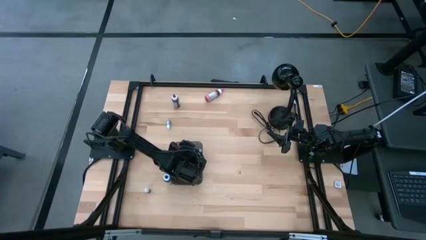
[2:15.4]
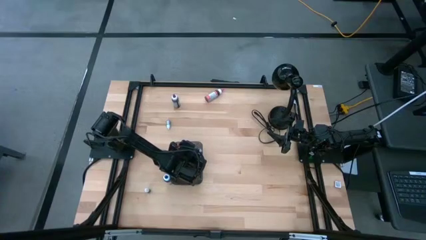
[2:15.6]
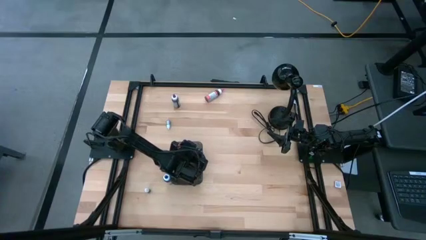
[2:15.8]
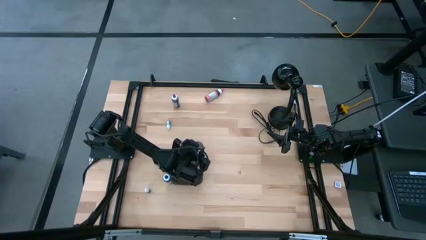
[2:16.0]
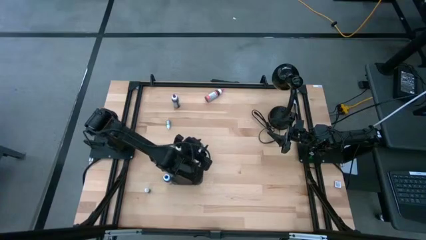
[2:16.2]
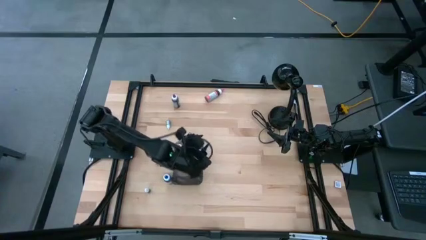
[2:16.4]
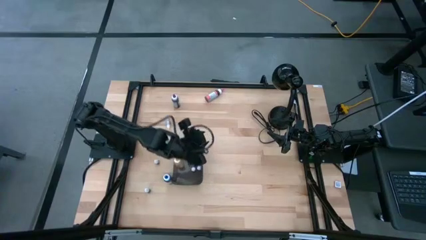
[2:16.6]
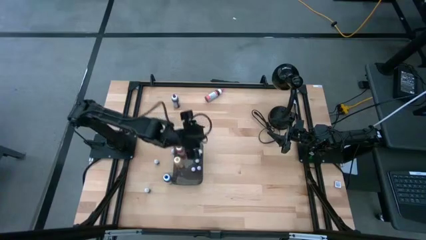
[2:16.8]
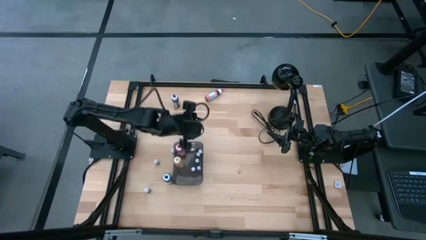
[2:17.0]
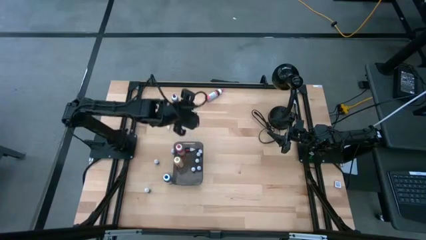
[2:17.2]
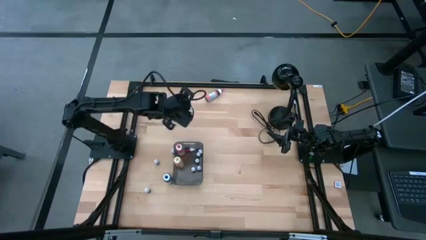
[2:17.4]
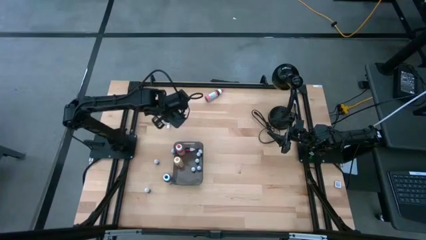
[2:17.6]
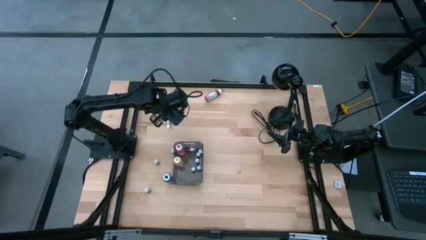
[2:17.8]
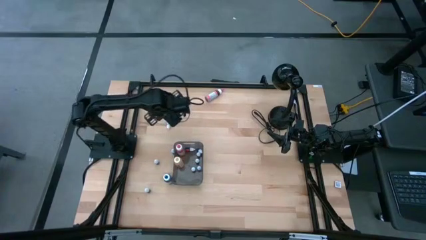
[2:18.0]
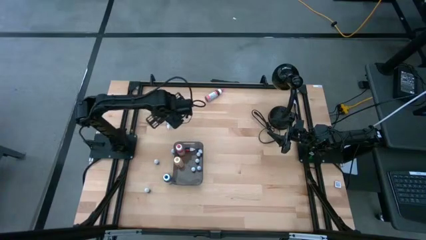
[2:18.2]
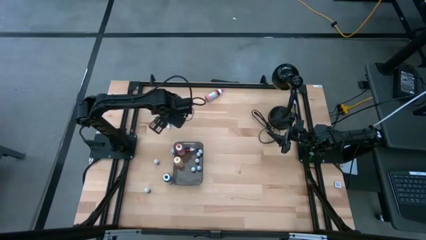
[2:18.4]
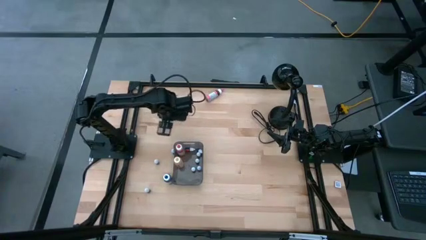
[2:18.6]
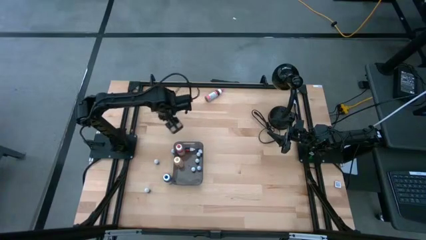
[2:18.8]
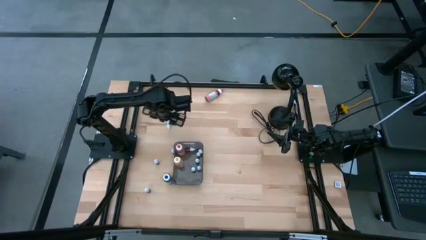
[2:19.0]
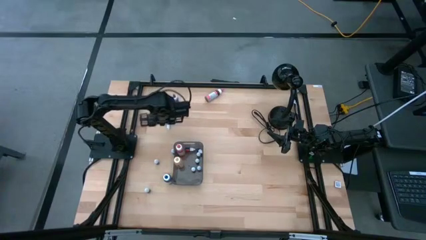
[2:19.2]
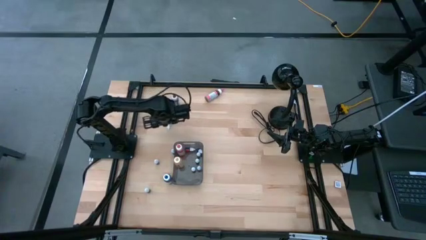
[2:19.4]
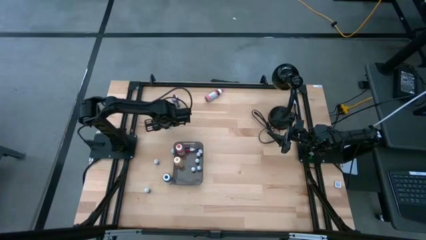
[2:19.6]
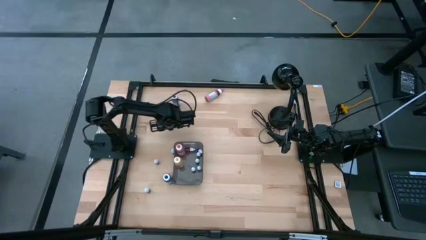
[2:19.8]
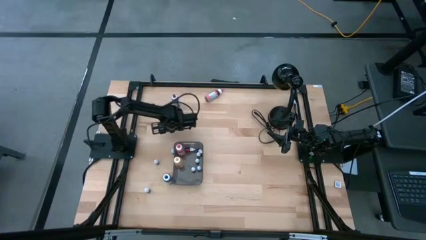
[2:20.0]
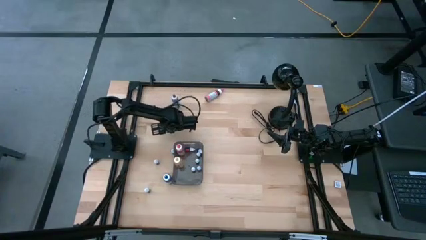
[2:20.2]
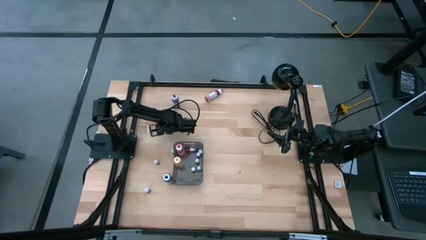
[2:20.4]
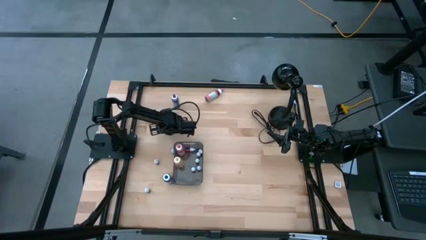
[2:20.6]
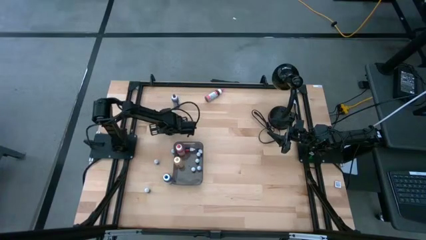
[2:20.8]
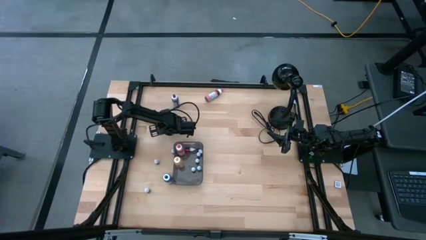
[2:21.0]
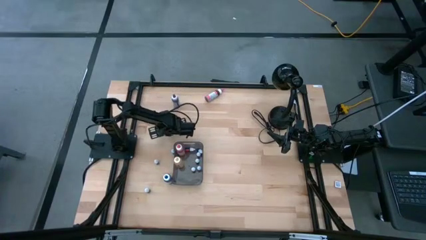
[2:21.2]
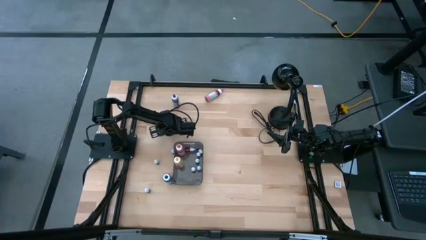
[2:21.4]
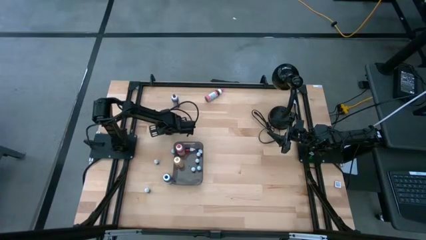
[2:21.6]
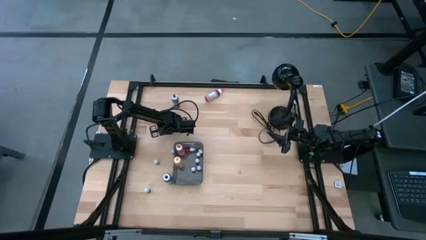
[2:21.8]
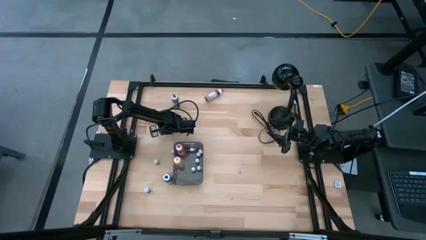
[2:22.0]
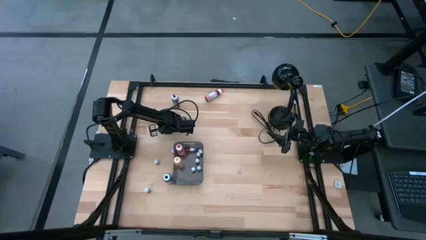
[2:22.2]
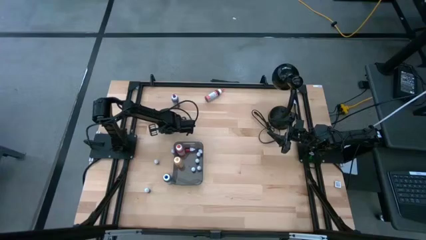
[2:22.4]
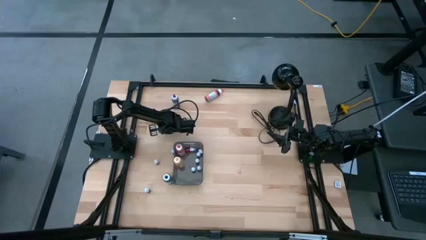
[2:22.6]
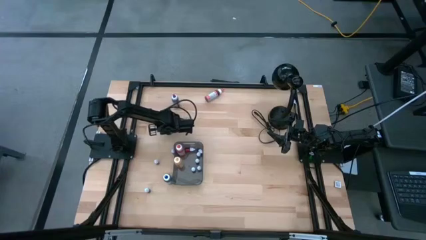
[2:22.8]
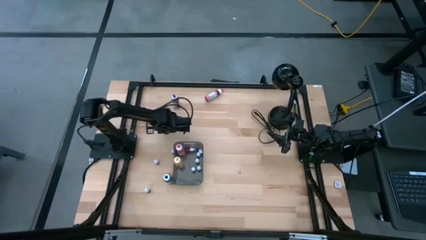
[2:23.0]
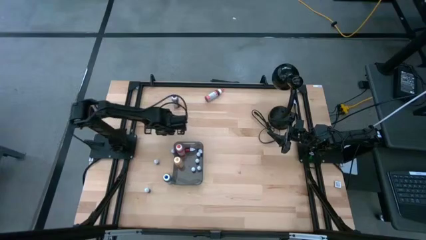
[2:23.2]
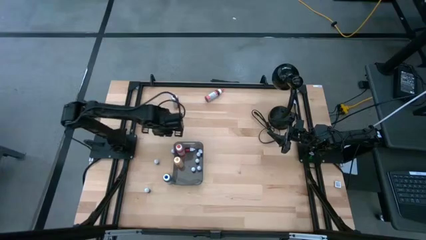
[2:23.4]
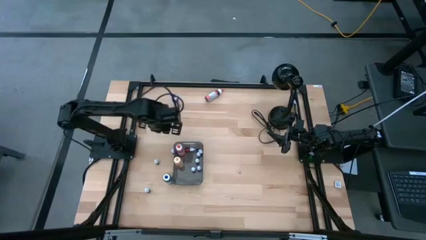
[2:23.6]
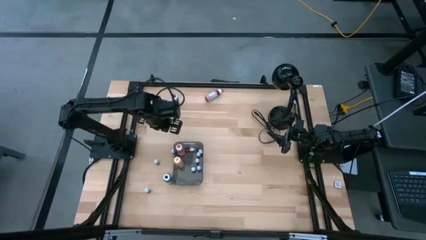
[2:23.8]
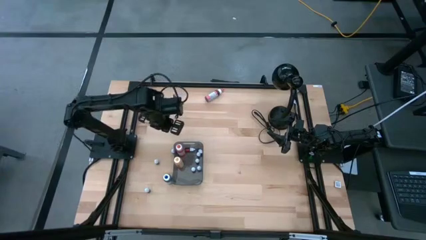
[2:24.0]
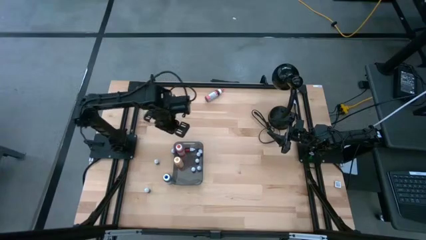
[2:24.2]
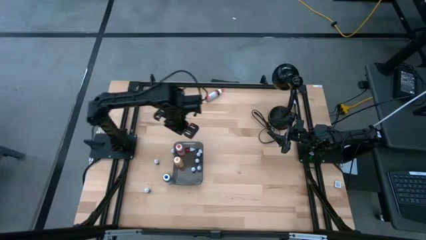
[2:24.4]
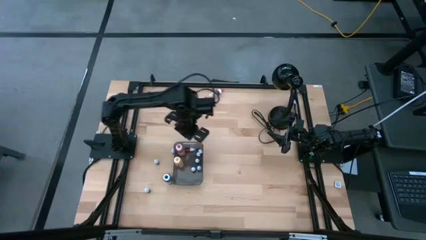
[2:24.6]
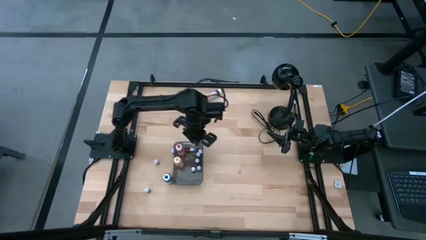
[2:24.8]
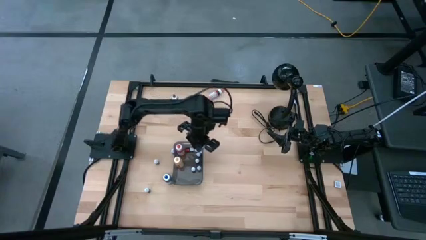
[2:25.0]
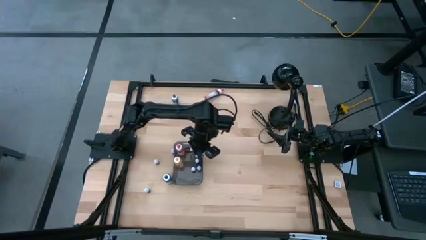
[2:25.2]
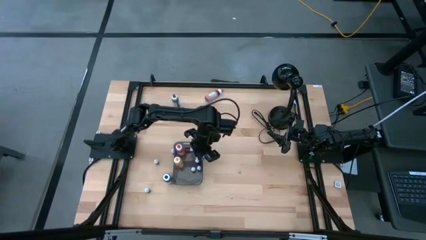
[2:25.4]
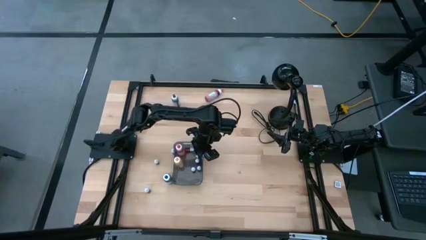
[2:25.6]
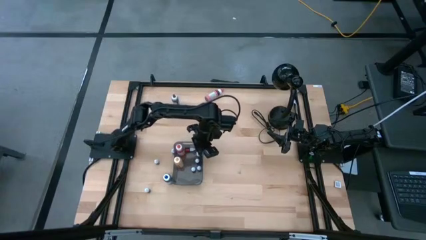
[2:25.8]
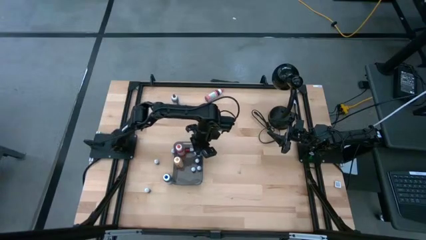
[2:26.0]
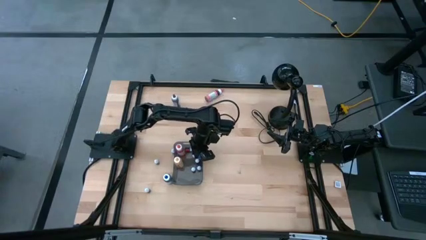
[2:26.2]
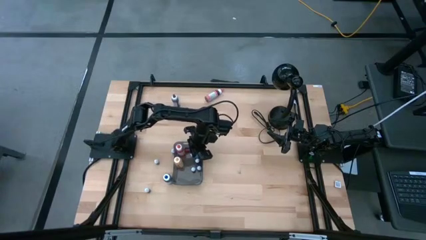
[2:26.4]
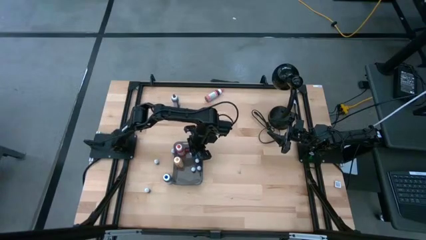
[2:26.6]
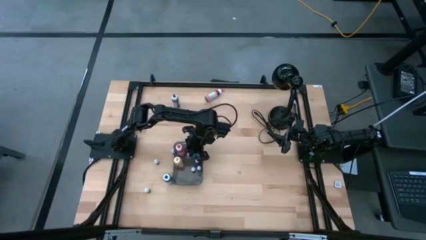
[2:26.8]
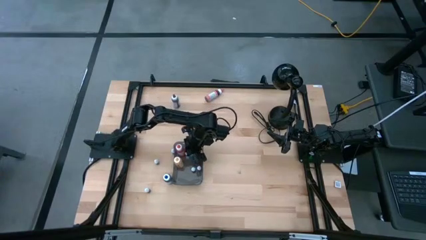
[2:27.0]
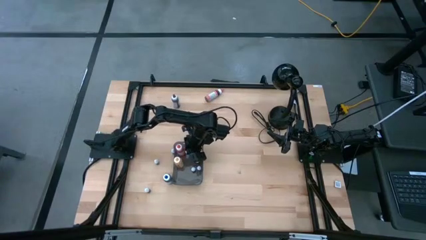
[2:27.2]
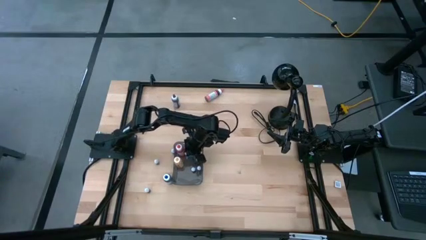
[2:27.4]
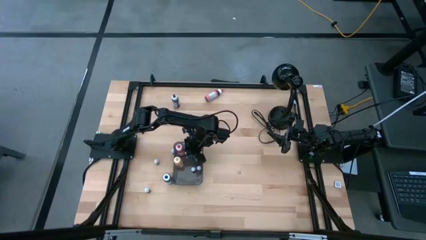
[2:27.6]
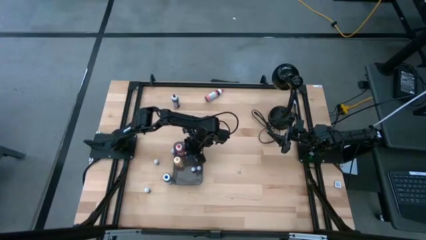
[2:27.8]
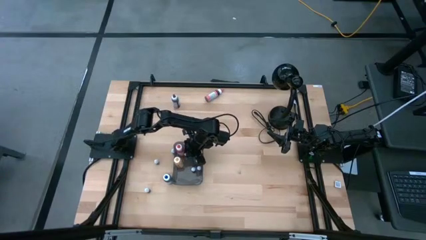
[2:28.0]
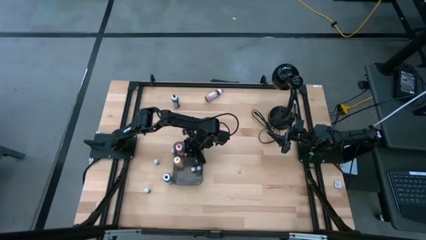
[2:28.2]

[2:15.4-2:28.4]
Task: Pick & Place food coloring
Put the top blue food coloring bottle into the bin
